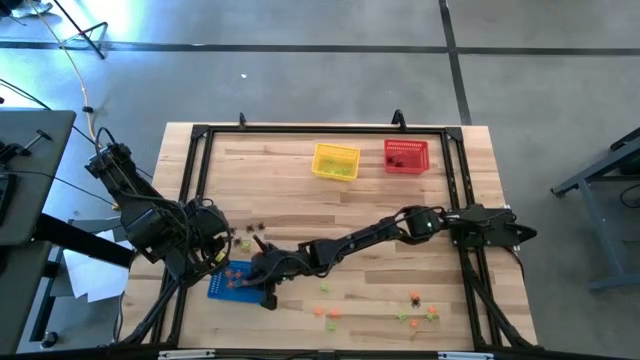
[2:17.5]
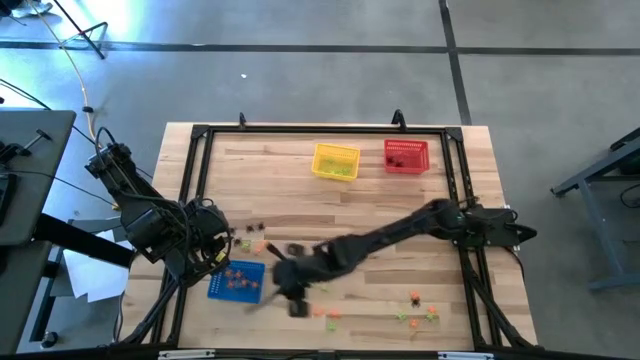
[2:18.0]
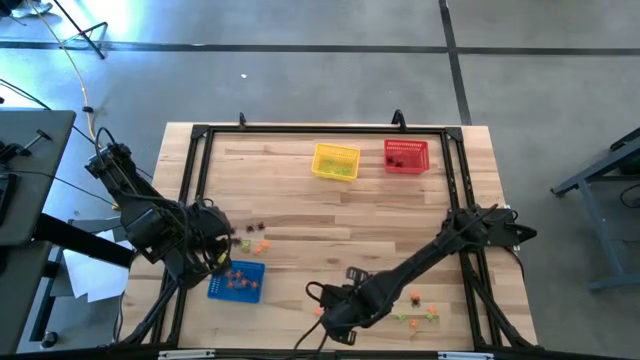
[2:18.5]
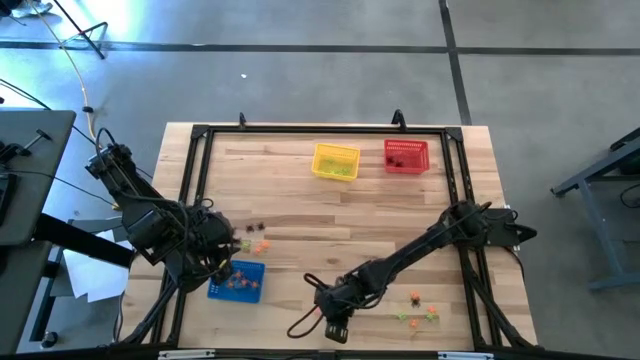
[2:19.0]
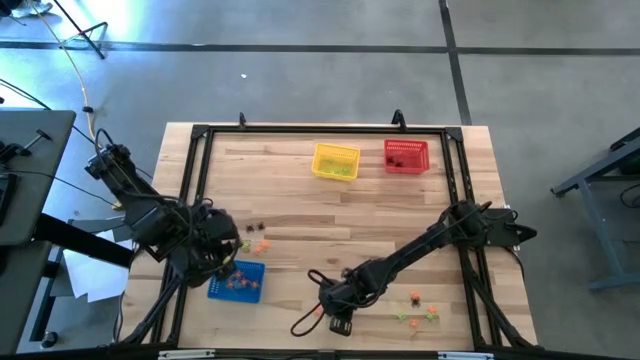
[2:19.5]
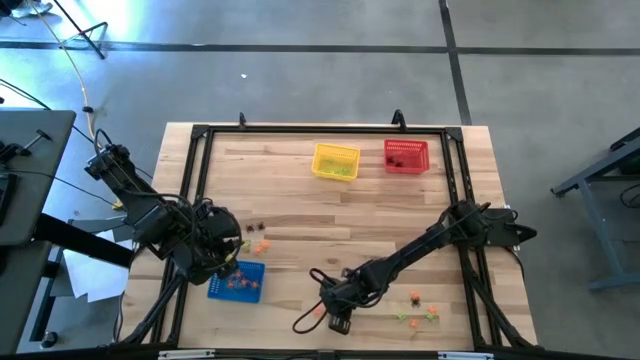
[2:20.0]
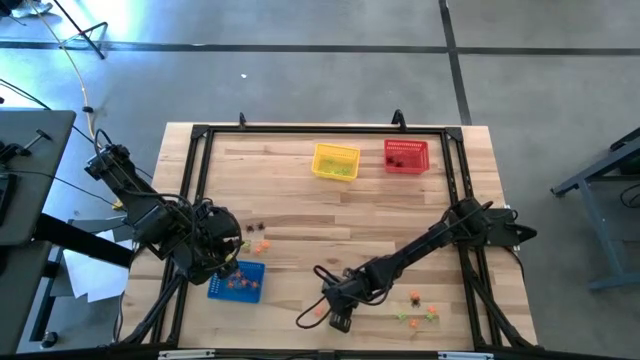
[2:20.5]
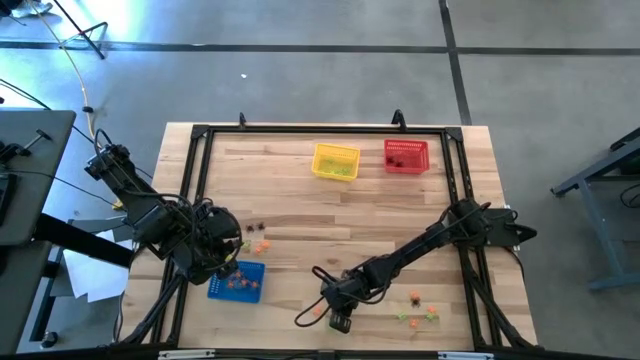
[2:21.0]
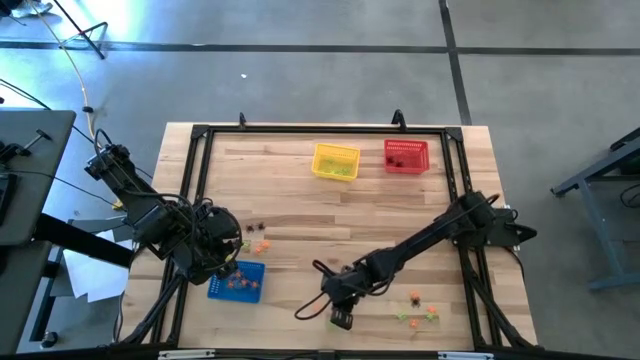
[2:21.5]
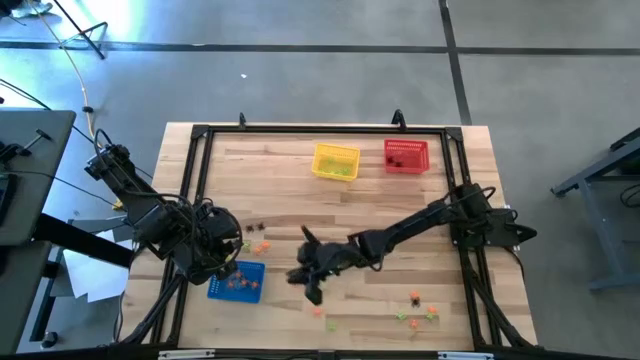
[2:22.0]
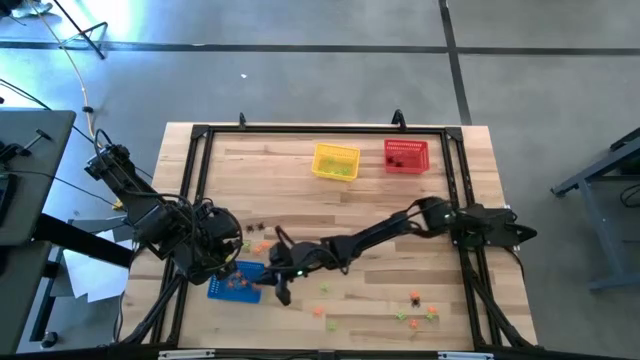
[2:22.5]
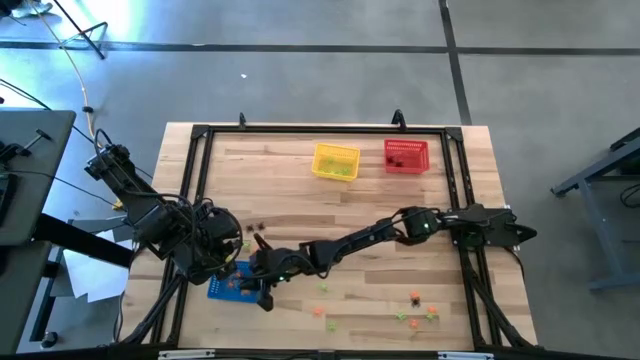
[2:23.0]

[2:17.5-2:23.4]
Task: Sort Halloween decoration
Put the orange spider toy into the blue bin

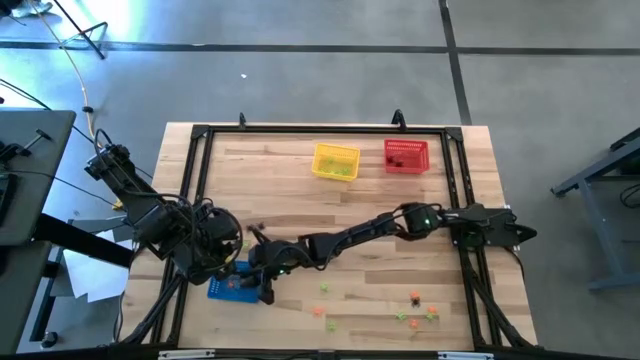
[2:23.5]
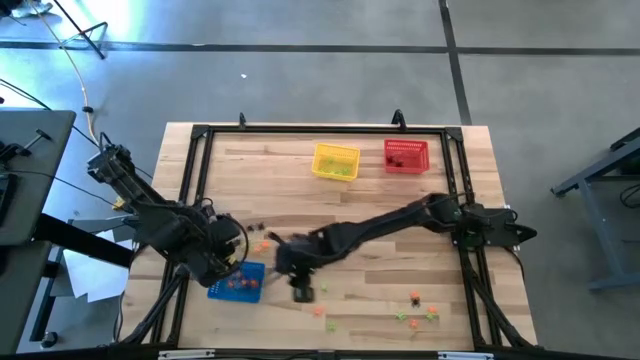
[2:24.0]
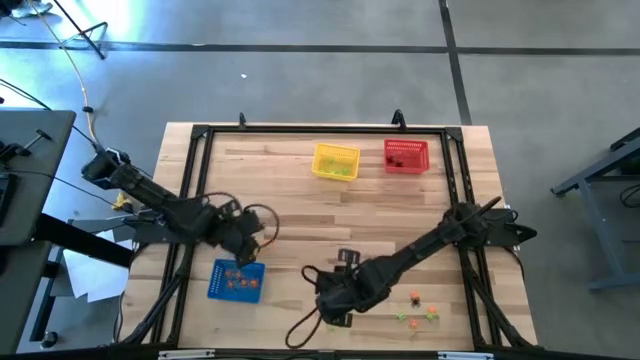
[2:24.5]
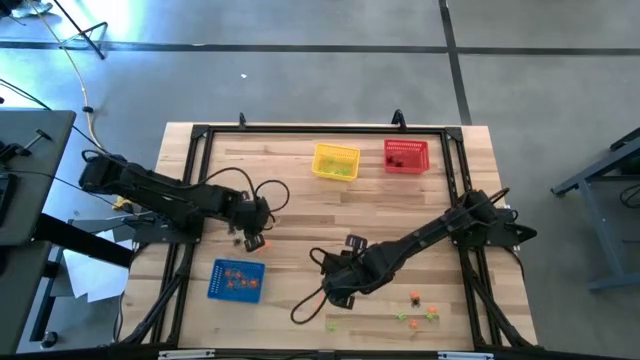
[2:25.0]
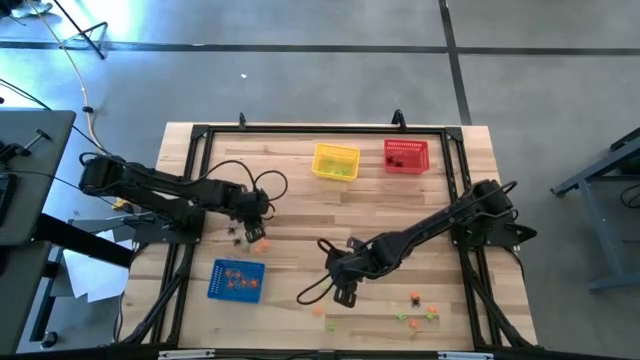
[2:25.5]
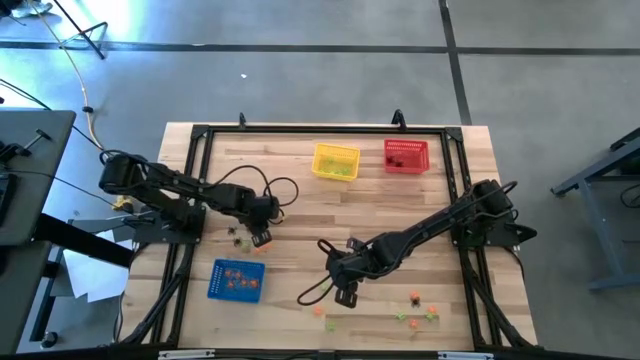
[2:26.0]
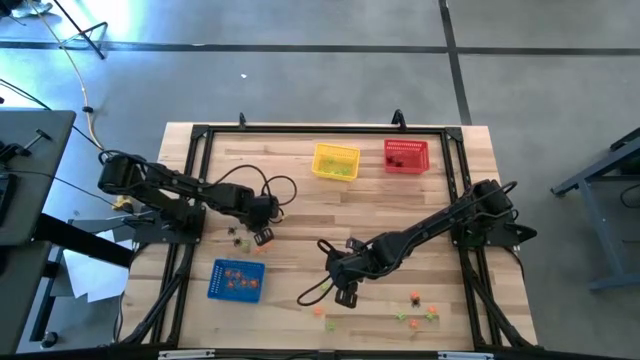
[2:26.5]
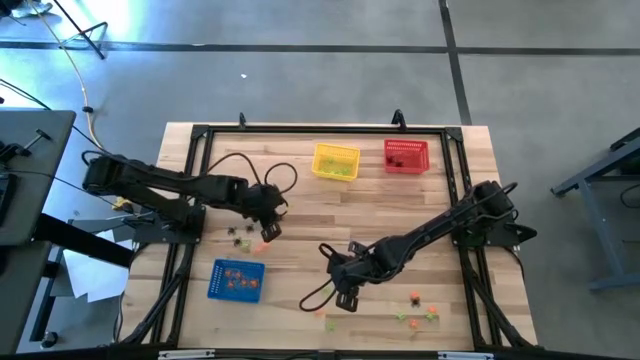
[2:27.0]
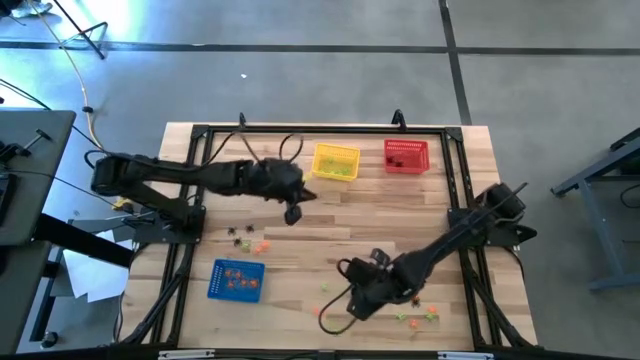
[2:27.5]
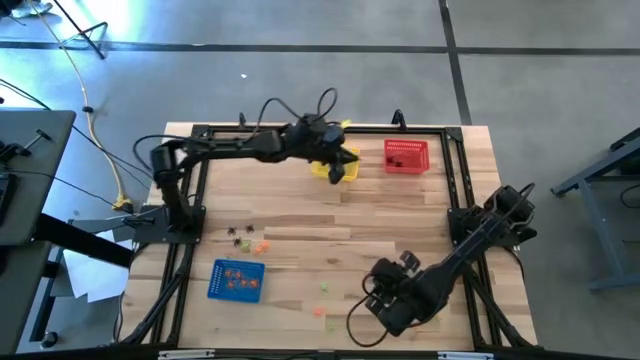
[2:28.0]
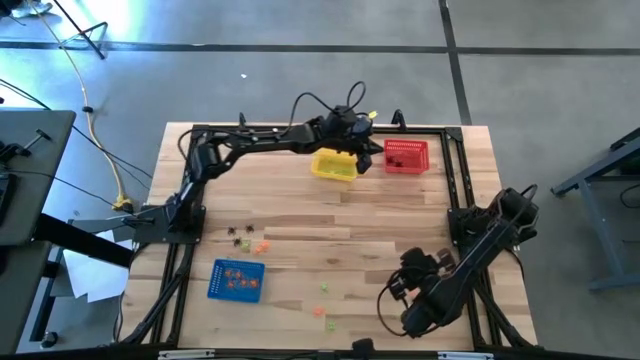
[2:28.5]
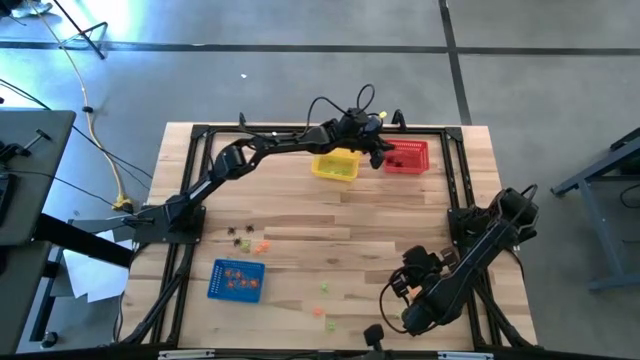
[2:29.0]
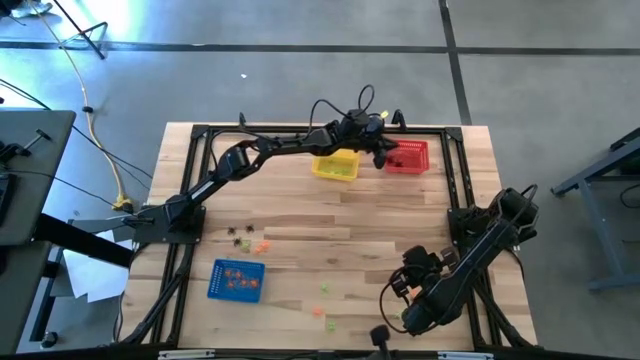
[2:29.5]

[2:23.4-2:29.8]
Put the black spider toy into the red bin

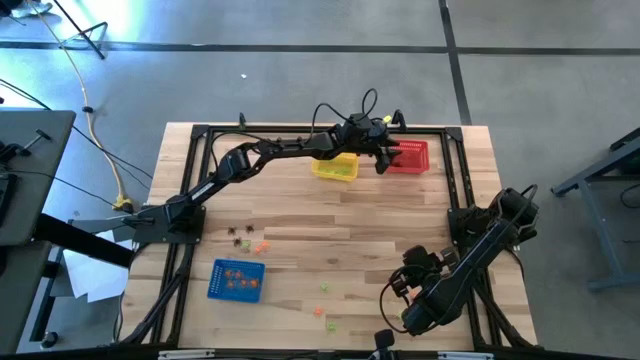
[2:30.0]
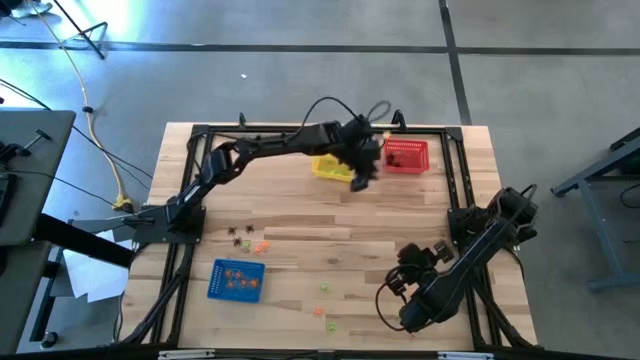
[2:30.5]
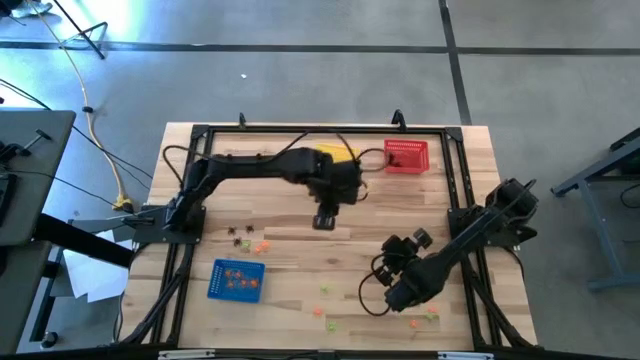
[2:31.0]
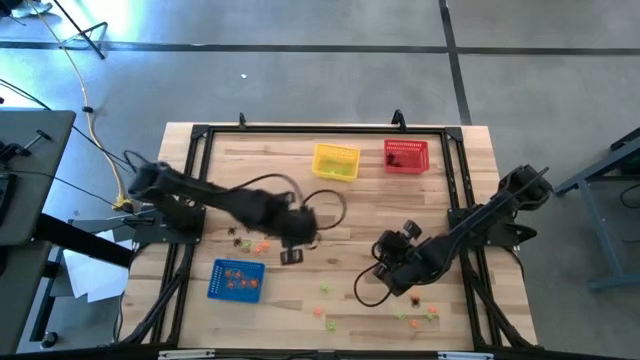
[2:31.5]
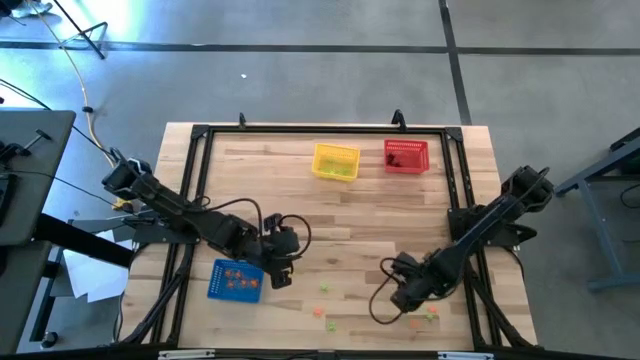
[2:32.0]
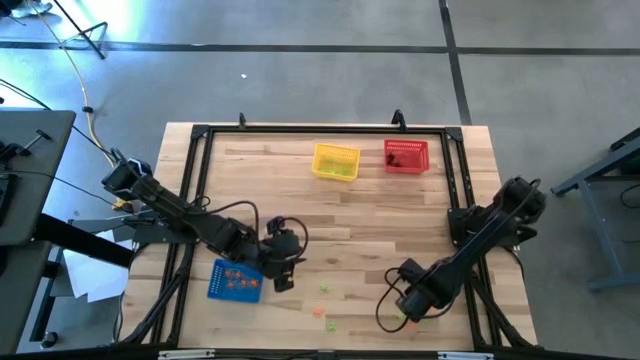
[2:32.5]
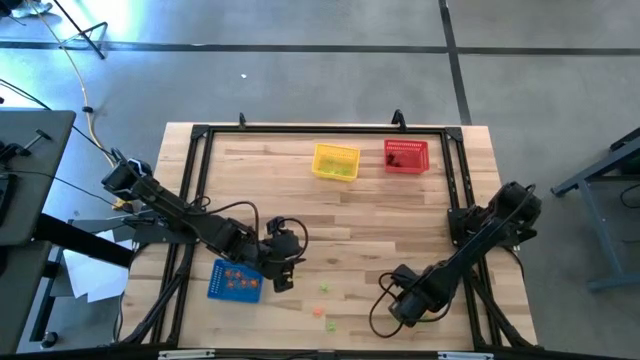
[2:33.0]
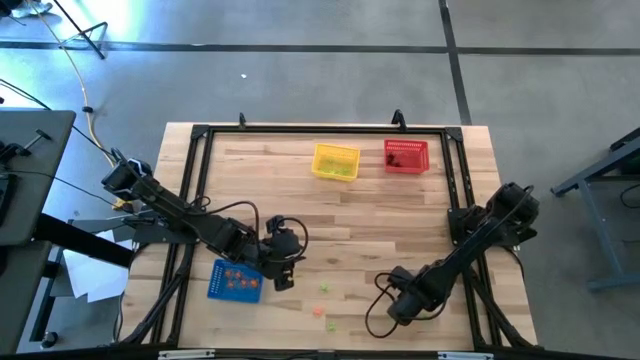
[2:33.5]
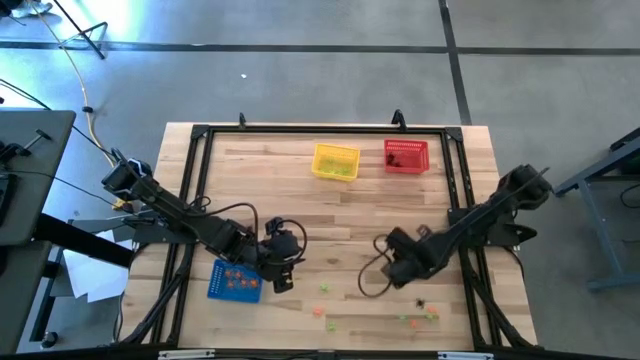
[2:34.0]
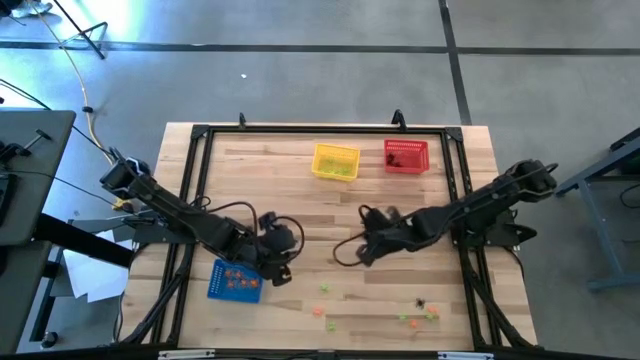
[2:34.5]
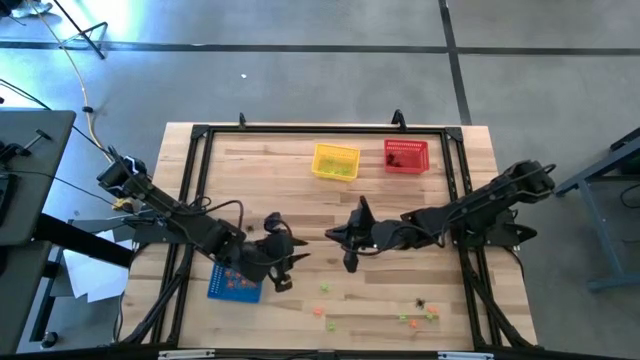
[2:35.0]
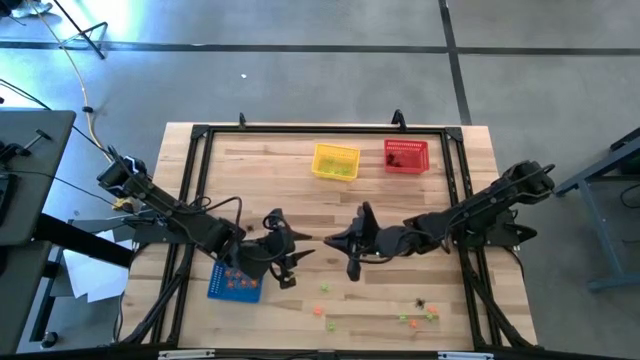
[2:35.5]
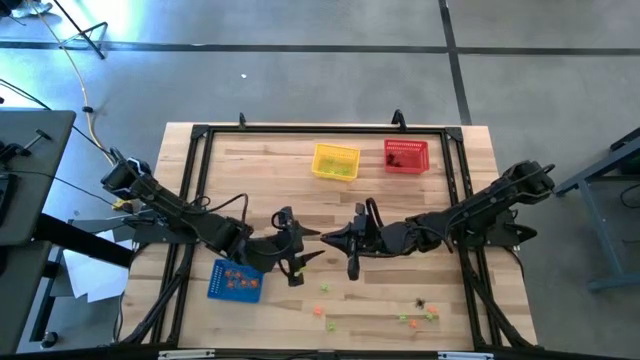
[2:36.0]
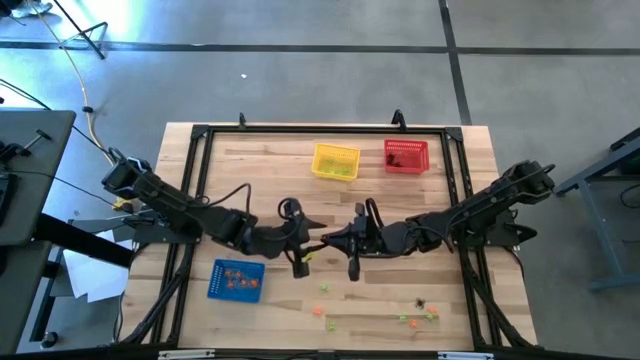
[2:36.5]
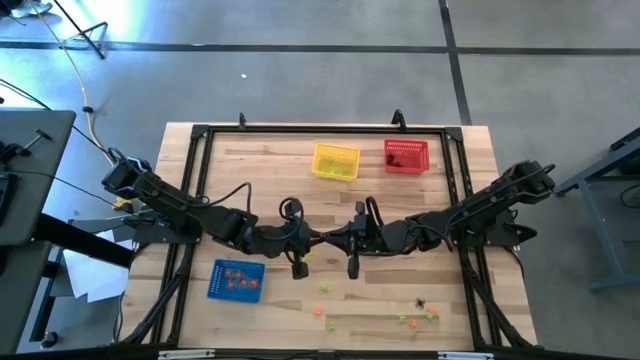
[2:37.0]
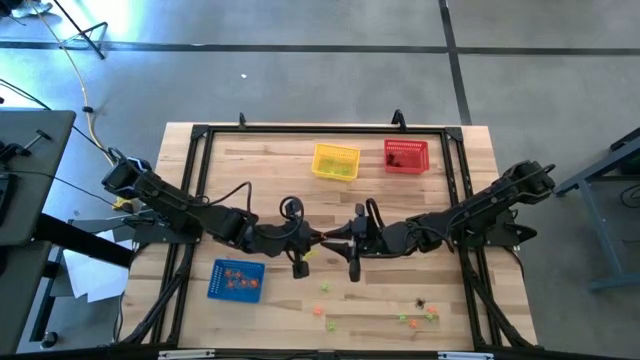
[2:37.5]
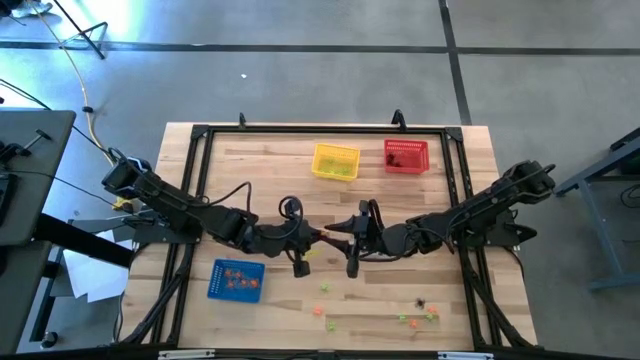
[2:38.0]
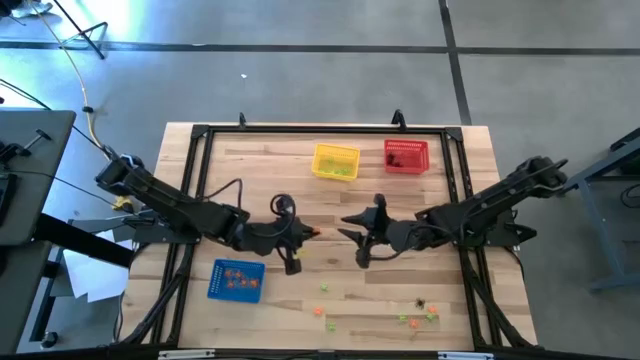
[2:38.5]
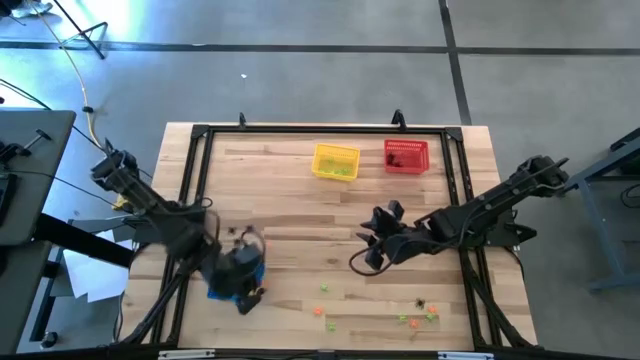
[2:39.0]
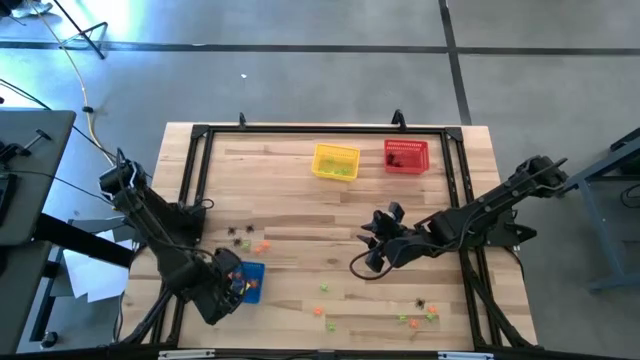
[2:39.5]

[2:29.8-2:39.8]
Put the orange spider toy into the blue bin
